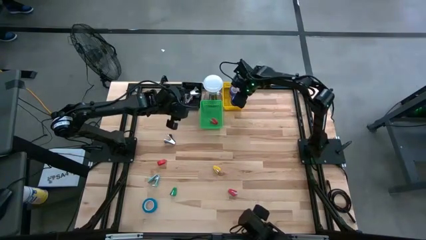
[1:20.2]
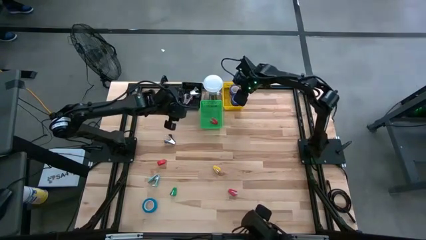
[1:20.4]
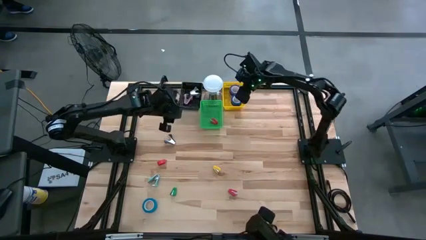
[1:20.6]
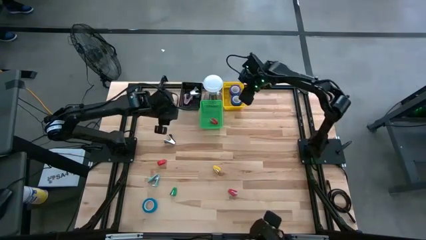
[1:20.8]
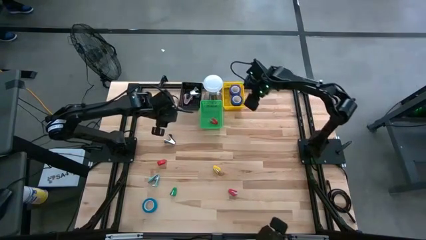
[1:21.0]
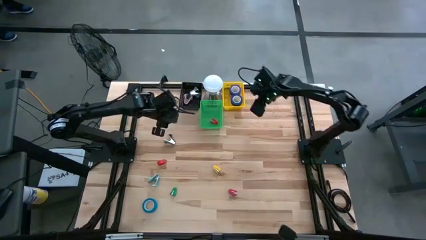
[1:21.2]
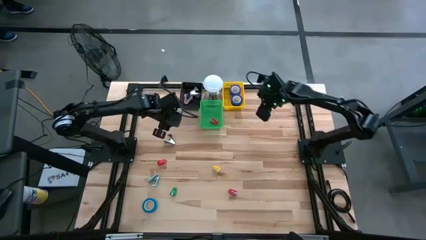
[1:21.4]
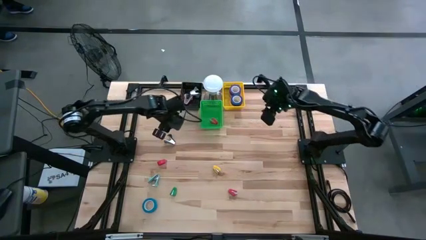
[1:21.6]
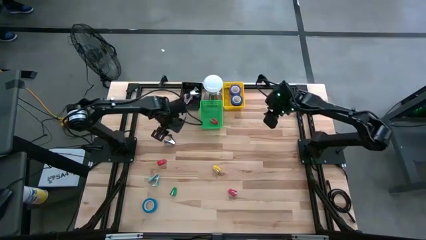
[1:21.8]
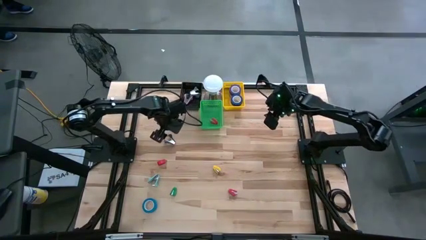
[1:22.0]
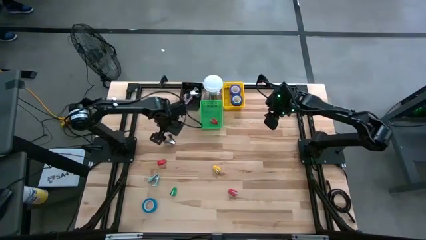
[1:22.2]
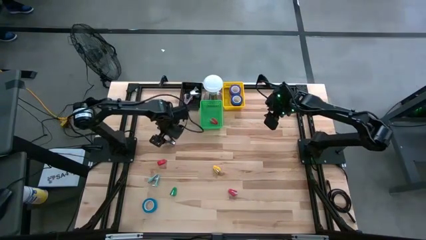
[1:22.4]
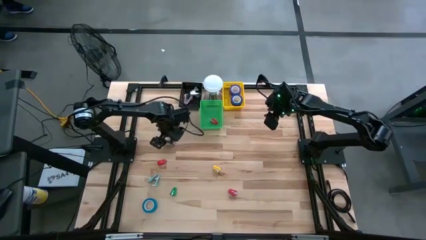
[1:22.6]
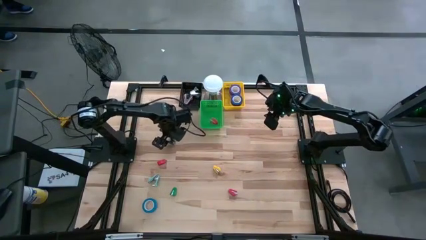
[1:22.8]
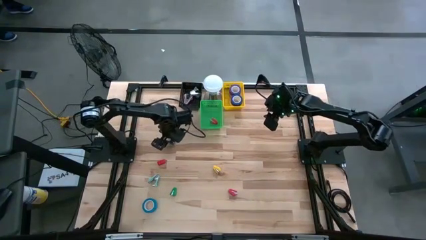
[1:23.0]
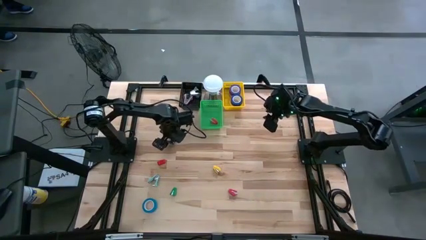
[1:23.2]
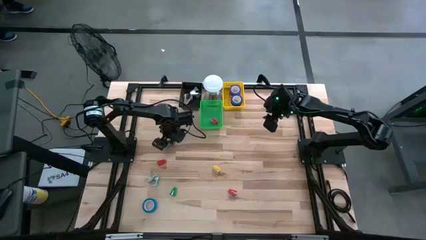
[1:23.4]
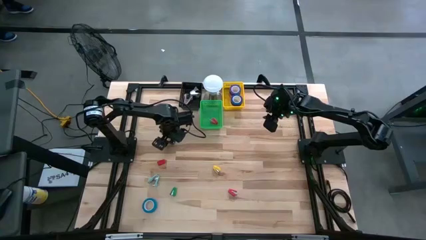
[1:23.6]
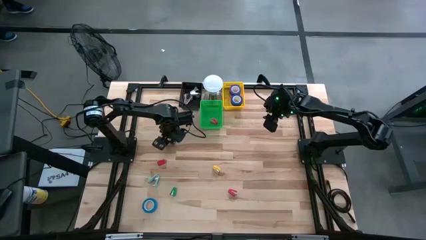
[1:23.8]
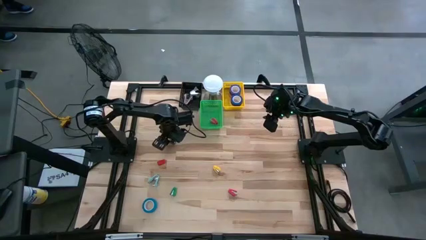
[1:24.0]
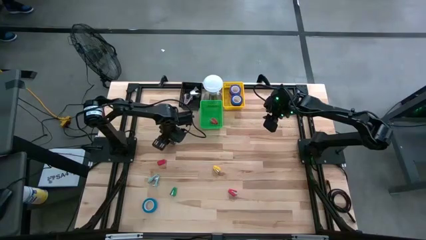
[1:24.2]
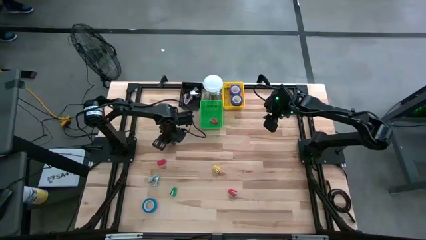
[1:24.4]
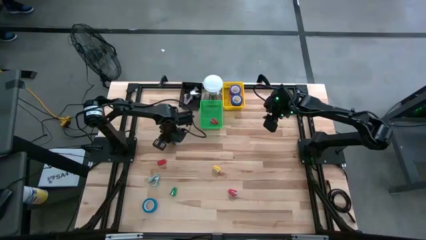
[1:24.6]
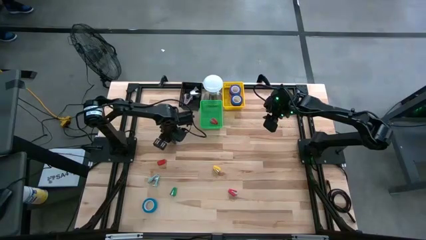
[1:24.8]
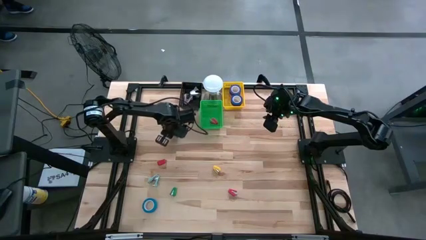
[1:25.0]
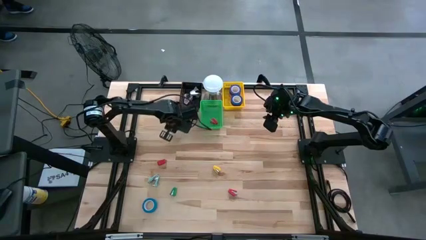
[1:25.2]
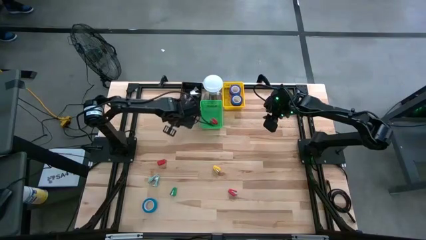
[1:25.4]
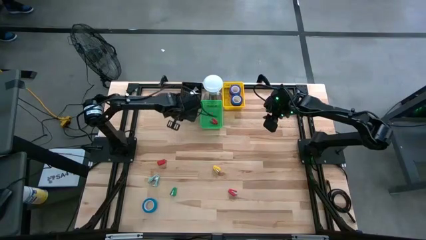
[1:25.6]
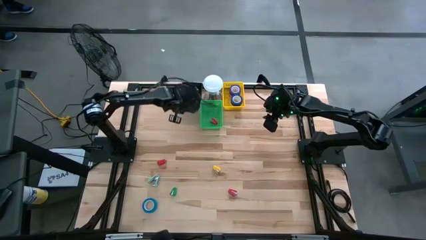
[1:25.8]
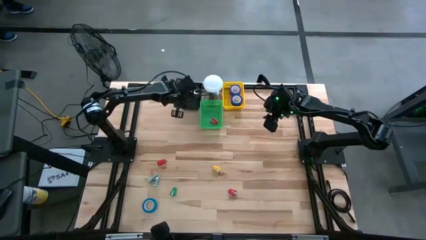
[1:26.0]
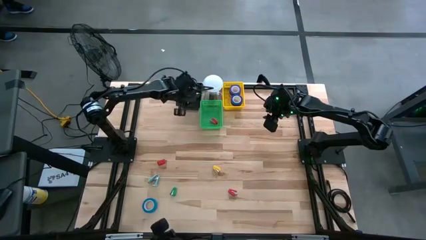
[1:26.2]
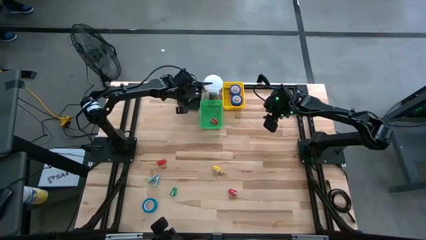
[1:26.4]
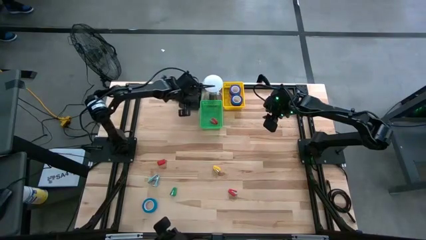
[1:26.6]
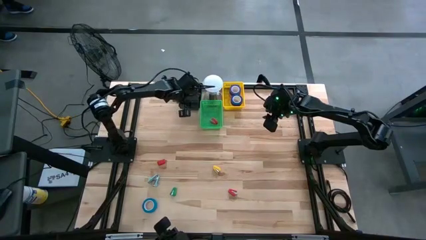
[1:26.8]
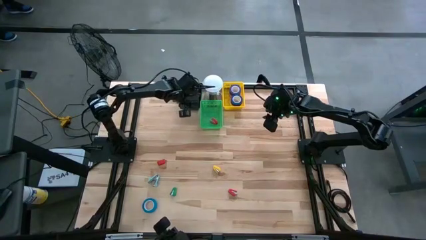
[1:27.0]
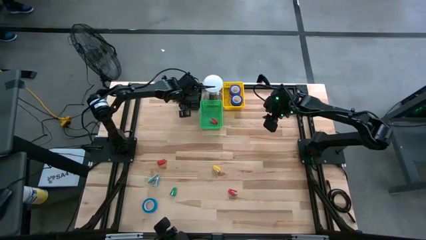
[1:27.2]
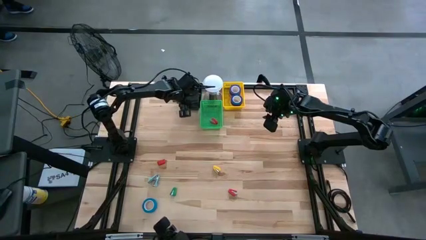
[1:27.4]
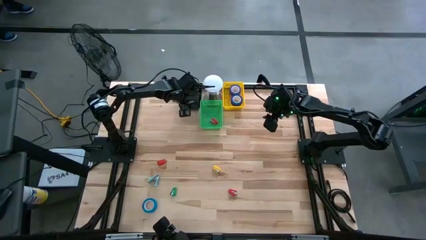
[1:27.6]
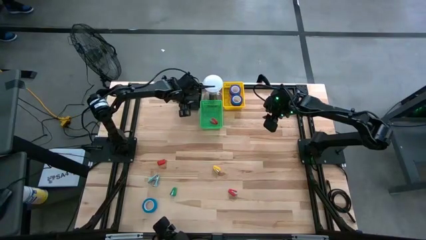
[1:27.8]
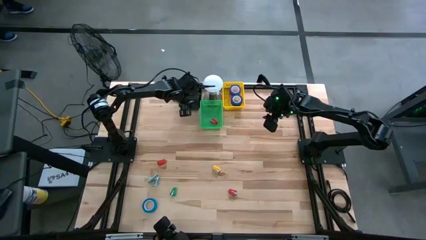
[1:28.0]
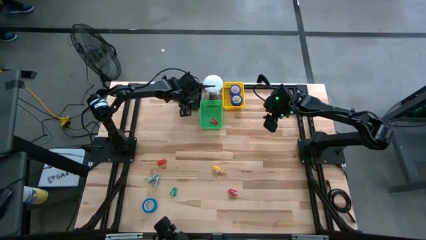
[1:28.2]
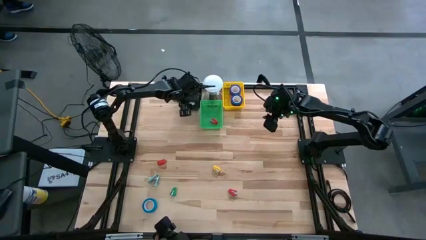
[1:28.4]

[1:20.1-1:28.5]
Task: Pick and place Stapler, Stapler remover, tape
Put the black staple remover into the black bin

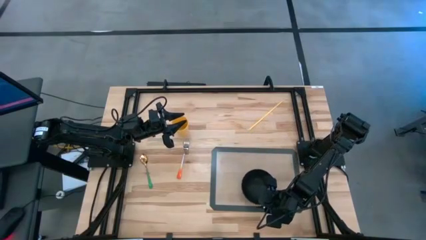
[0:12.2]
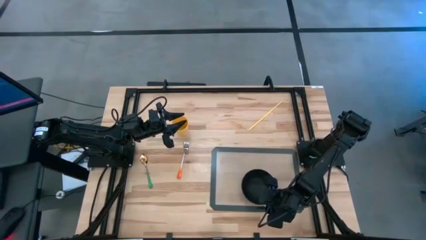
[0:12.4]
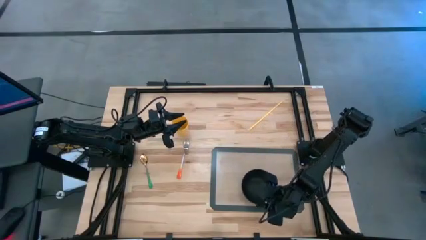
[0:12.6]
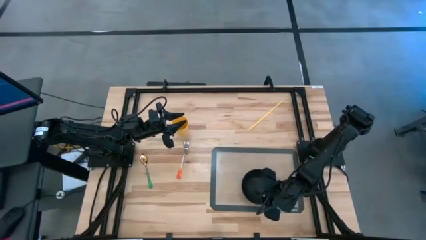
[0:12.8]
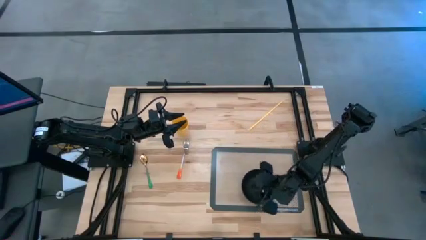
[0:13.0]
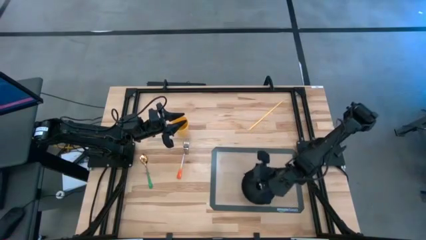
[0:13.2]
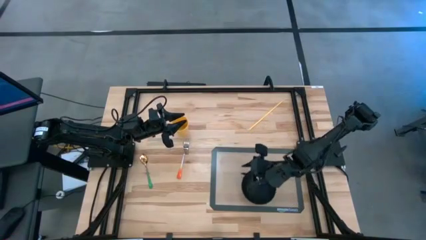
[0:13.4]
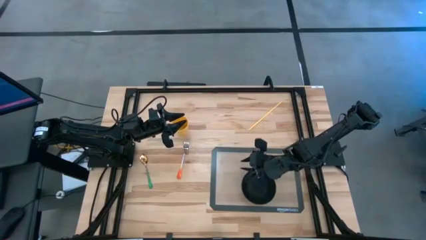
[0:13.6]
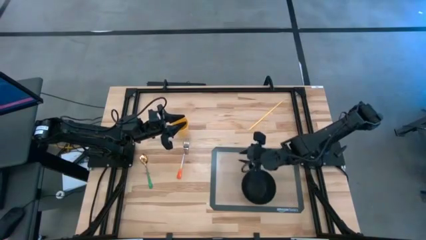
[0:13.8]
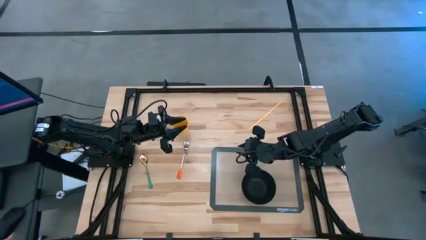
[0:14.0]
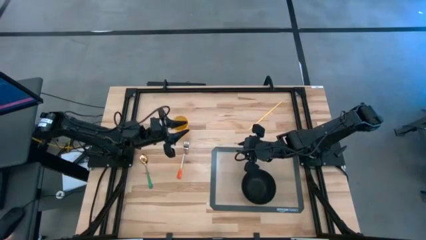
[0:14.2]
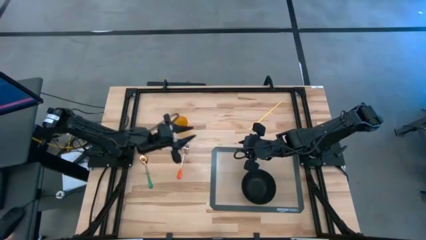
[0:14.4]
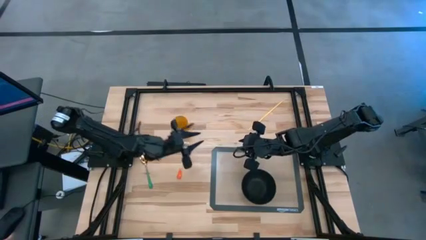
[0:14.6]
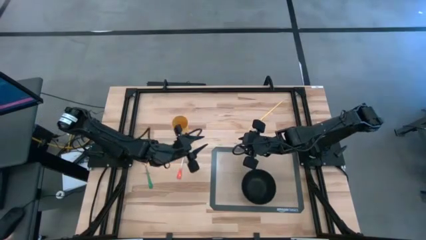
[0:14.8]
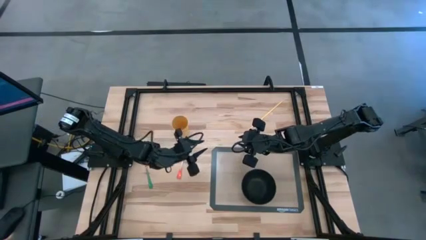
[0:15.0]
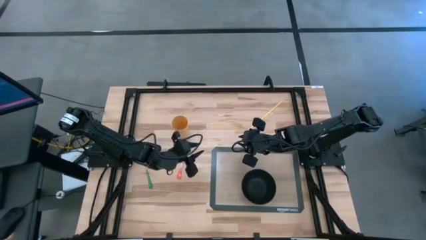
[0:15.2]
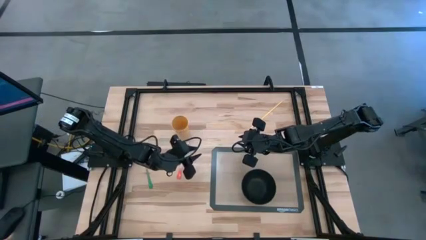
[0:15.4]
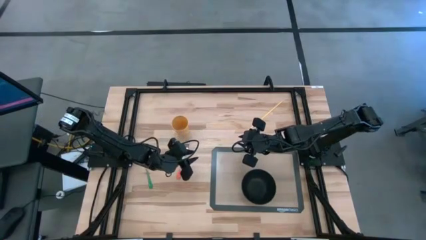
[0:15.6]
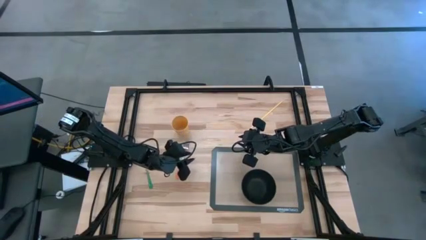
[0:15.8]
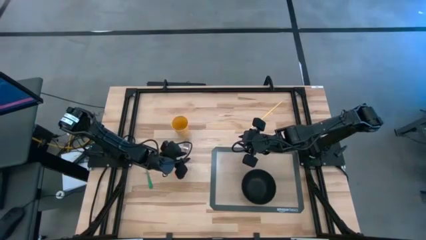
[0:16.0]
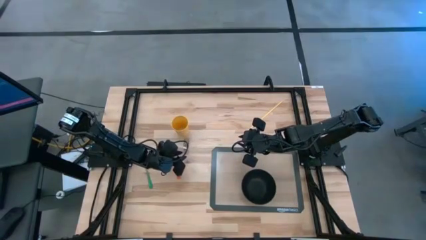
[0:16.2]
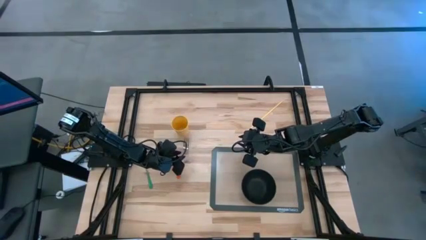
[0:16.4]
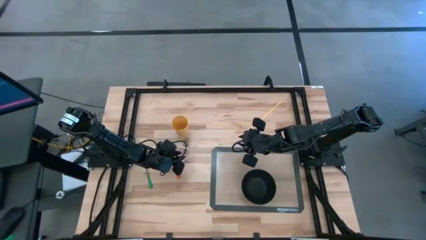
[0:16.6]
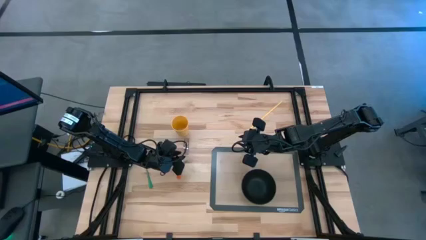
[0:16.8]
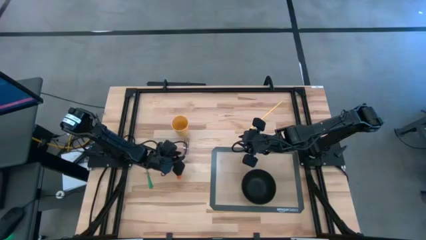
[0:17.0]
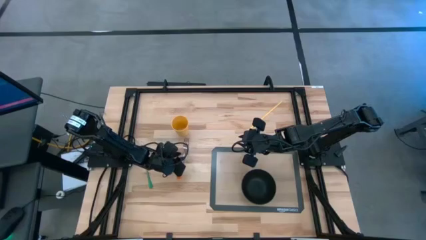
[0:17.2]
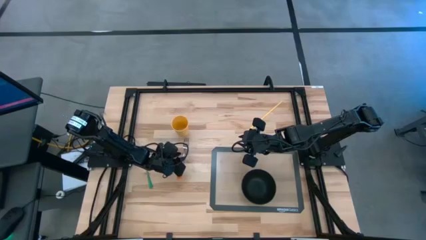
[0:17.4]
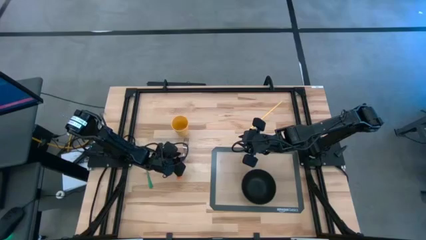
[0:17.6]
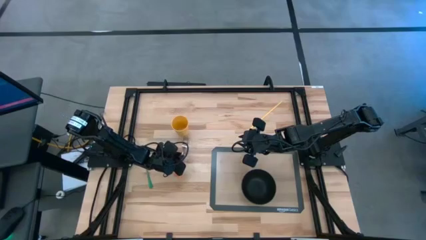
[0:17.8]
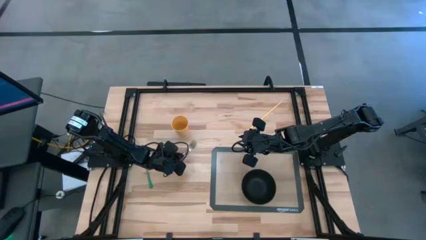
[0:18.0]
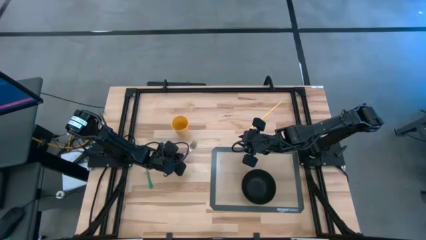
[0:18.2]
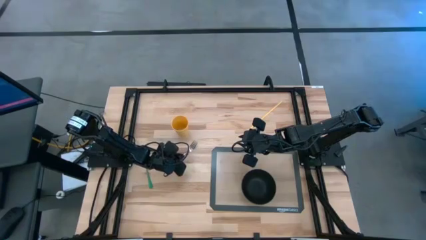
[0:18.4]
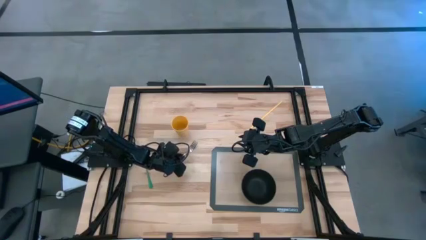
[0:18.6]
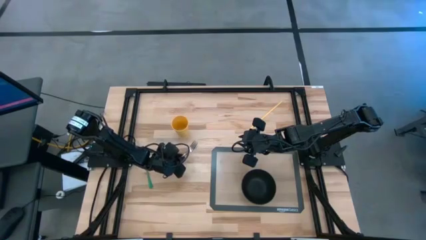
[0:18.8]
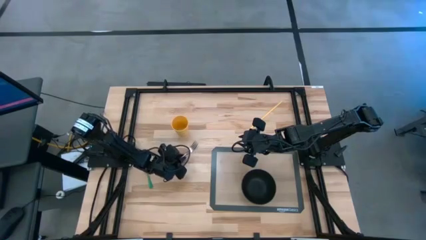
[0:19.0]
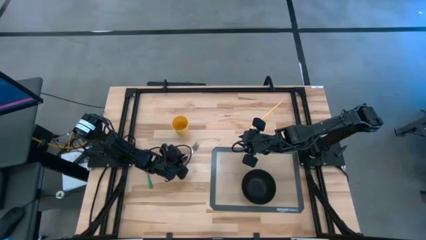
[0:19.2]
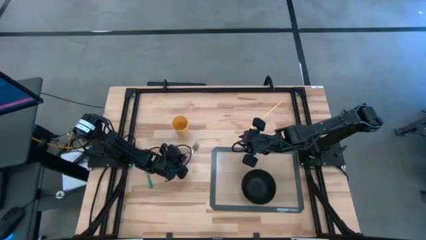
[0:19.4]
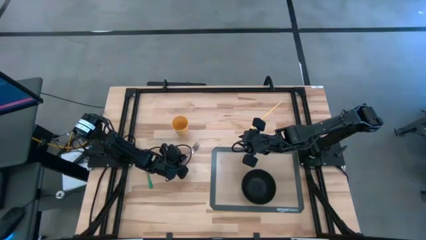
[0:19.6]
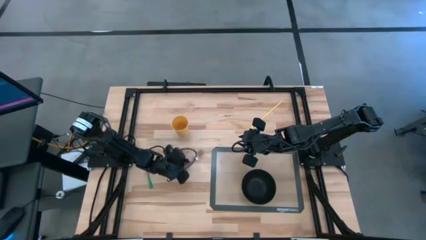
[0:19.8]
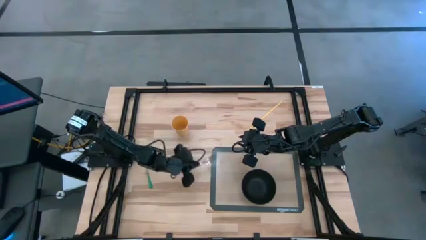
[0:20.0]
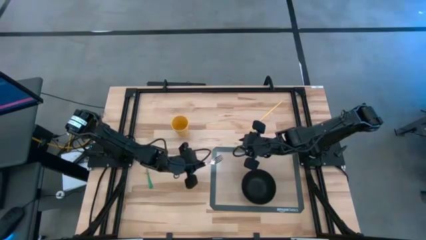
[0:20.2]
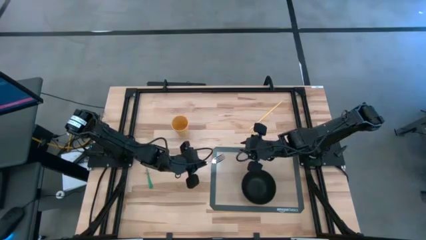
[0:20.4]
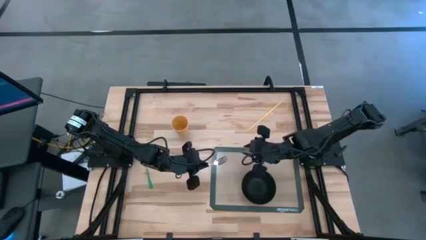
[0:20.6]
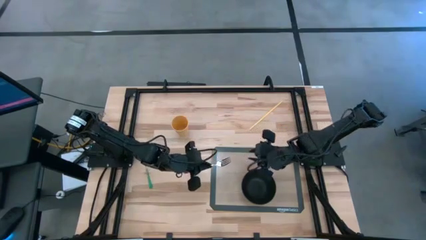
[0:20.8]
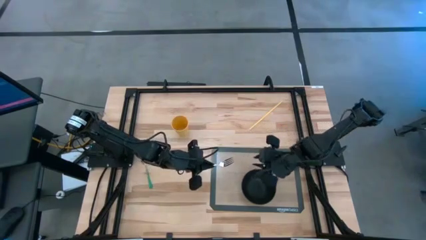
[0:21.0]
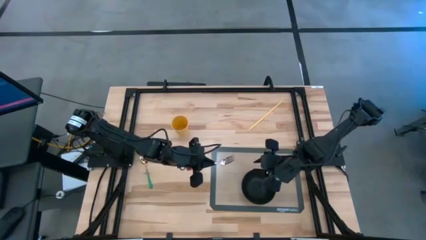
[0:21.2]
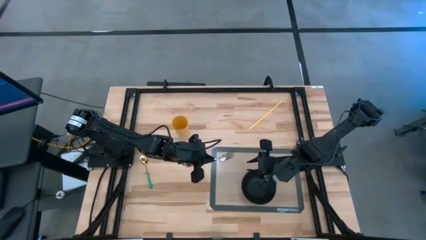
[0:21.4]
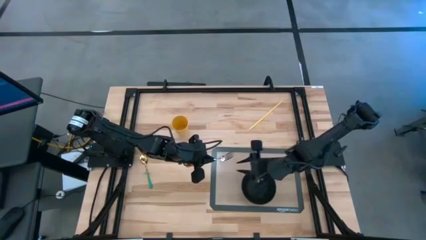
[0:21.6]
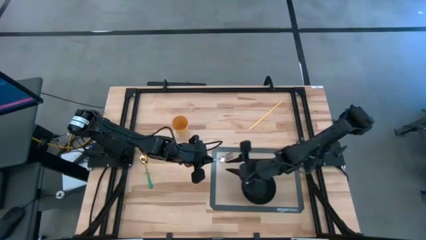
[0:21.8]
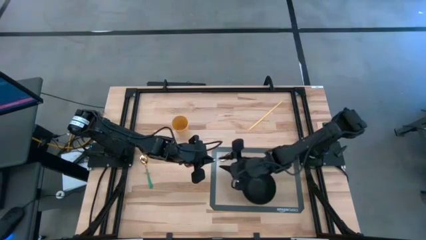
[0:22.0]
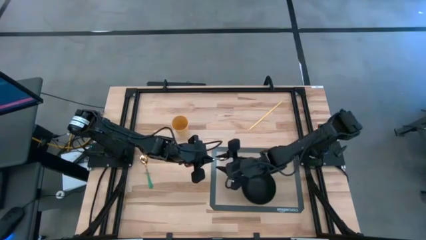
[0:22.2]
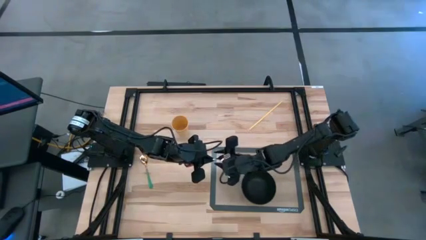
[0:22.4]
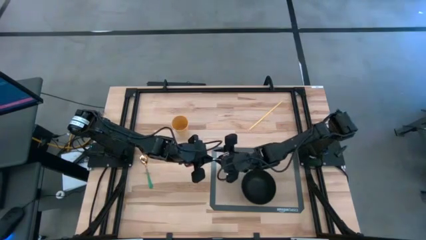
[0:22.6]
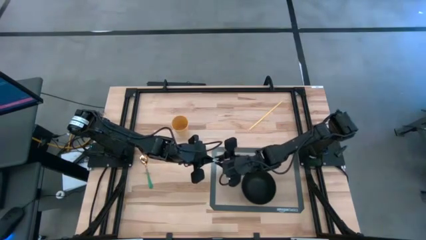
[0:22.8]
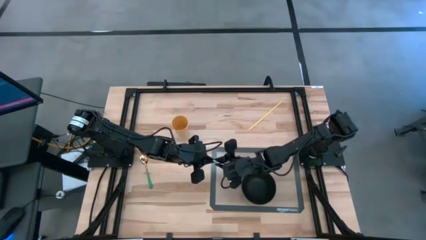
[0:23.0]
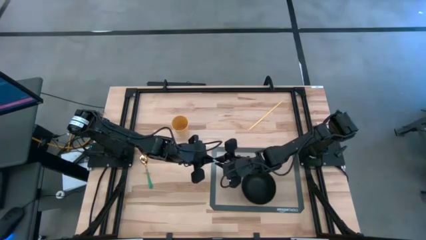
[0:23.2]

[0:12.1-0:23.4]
Task: Pick & Place Utensil
Put the orange silver fork into the black bowl on the table placemat
